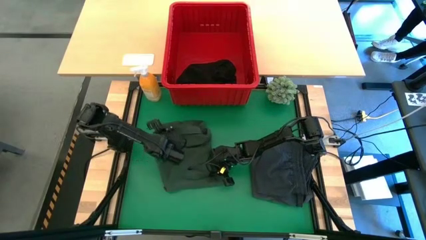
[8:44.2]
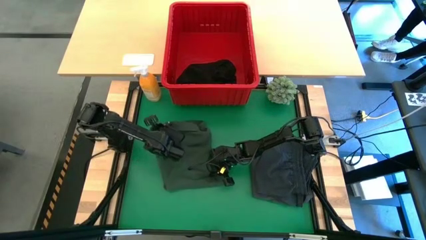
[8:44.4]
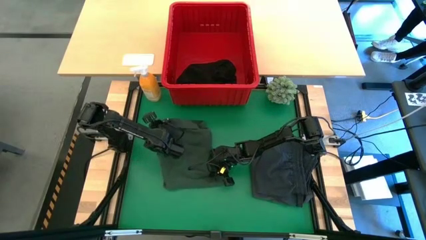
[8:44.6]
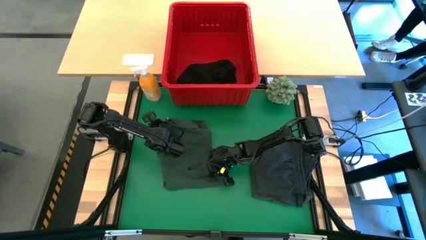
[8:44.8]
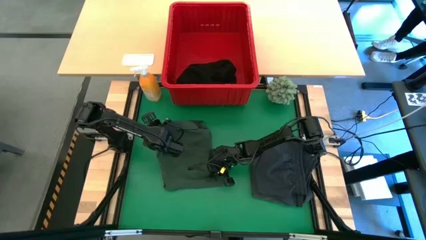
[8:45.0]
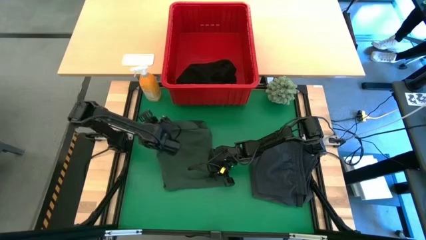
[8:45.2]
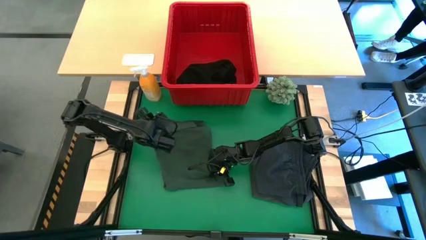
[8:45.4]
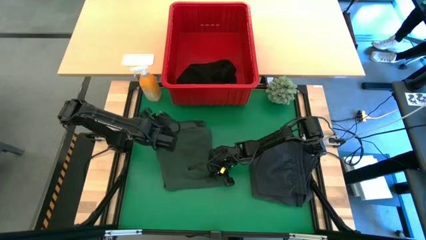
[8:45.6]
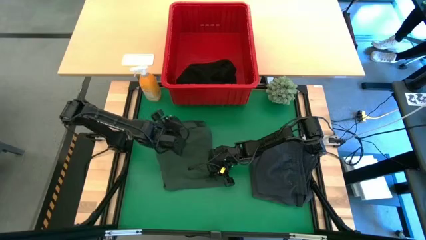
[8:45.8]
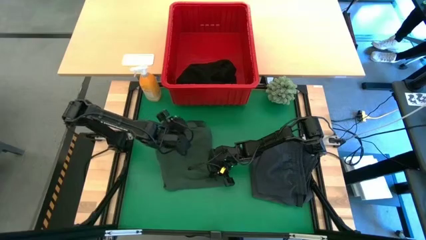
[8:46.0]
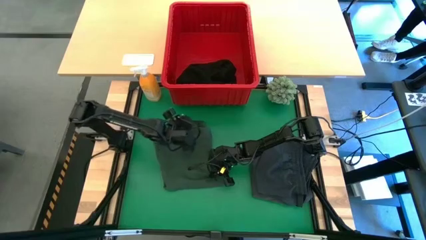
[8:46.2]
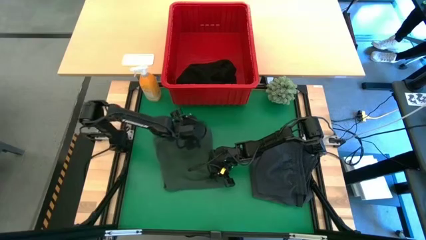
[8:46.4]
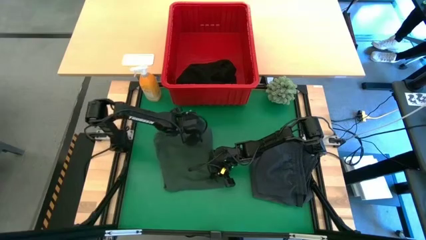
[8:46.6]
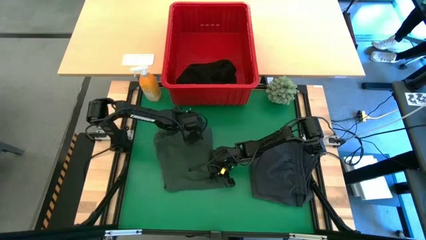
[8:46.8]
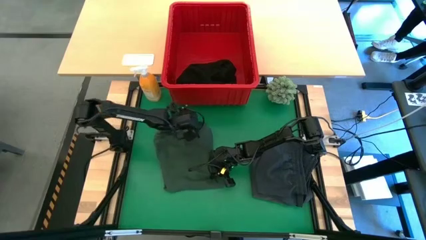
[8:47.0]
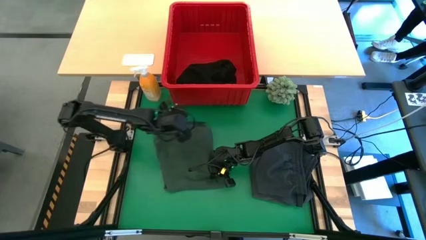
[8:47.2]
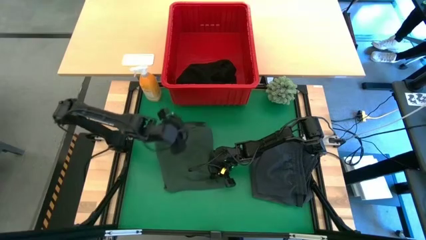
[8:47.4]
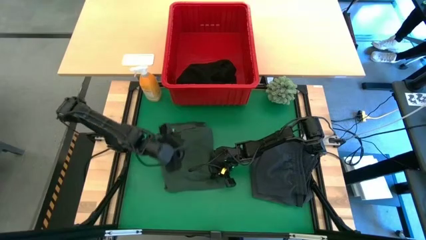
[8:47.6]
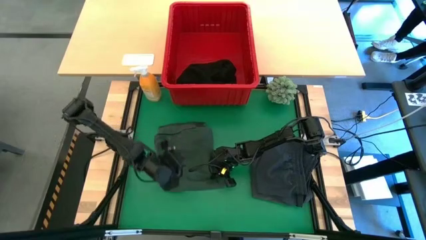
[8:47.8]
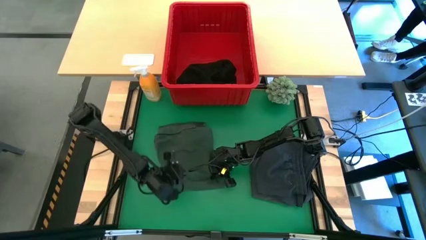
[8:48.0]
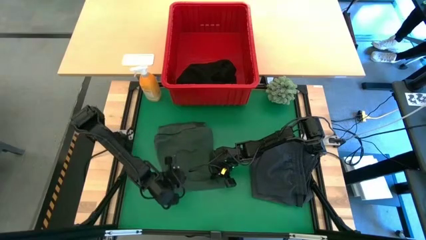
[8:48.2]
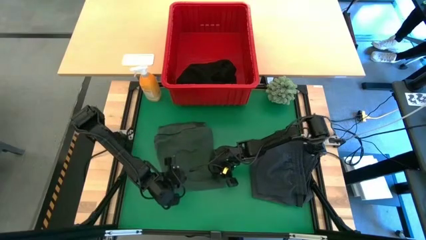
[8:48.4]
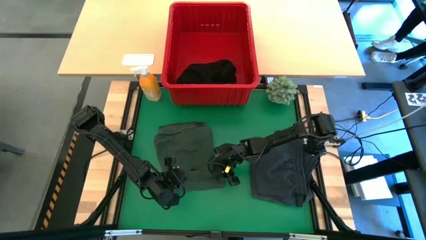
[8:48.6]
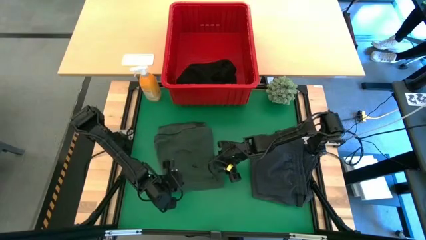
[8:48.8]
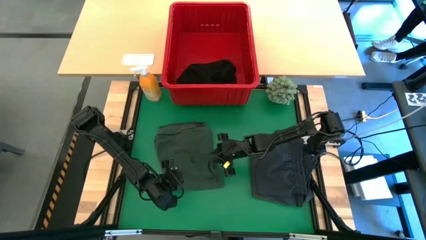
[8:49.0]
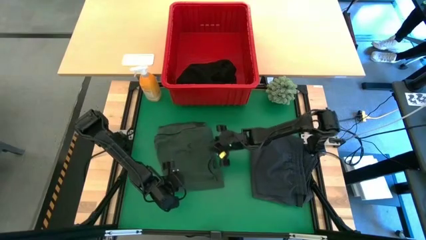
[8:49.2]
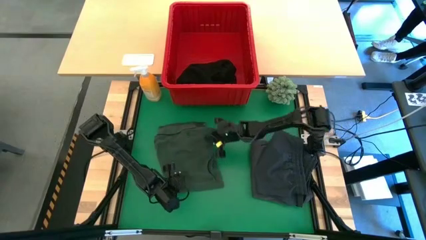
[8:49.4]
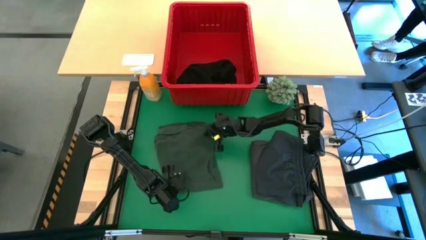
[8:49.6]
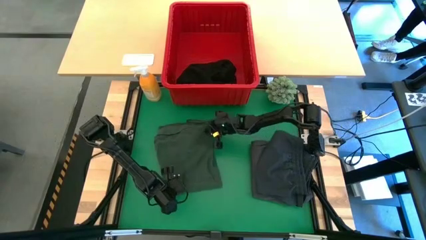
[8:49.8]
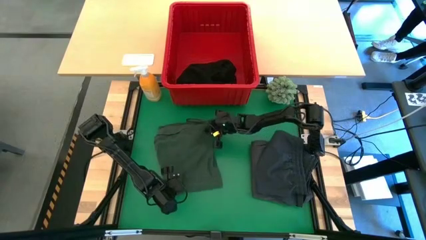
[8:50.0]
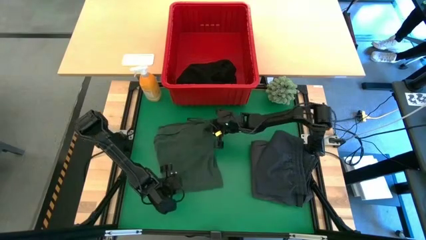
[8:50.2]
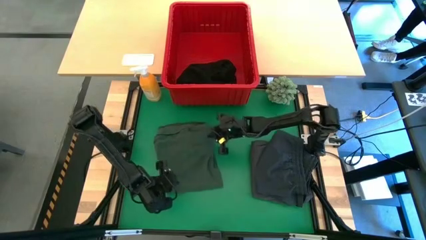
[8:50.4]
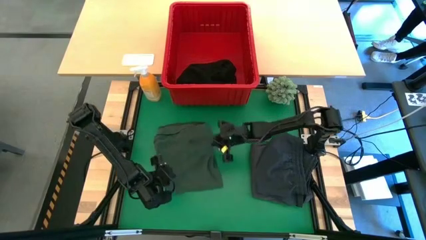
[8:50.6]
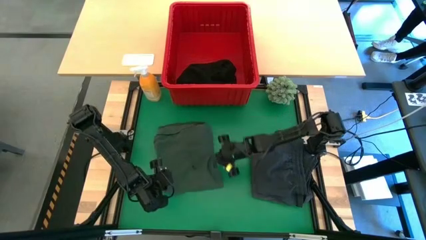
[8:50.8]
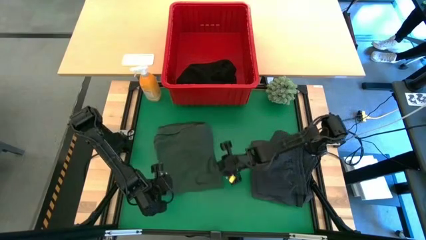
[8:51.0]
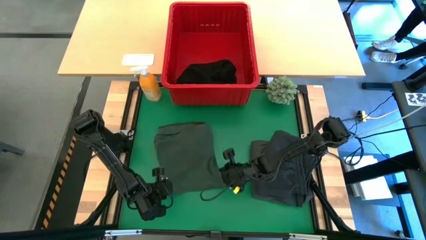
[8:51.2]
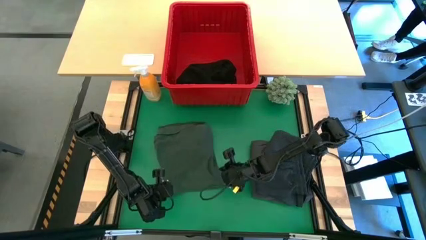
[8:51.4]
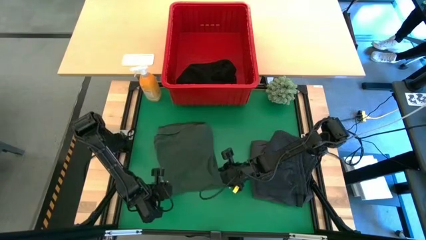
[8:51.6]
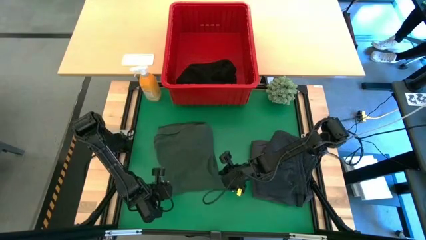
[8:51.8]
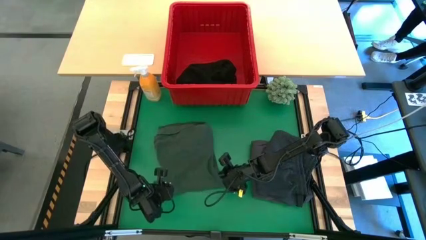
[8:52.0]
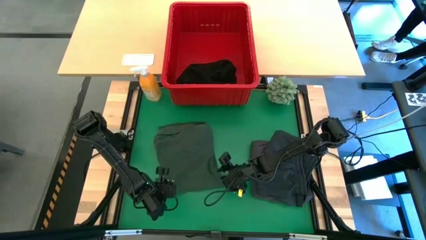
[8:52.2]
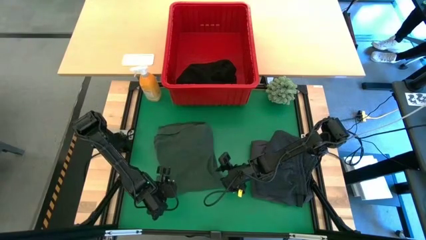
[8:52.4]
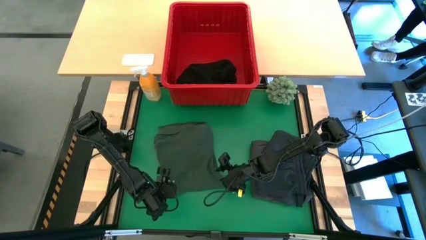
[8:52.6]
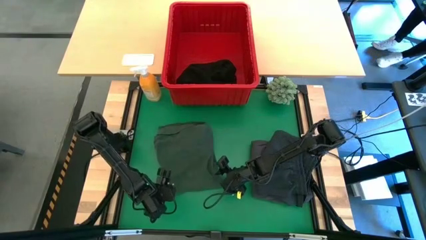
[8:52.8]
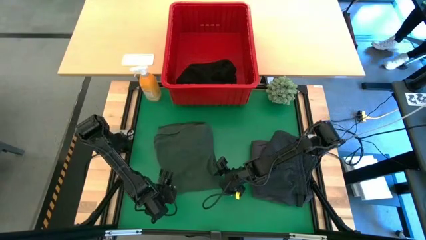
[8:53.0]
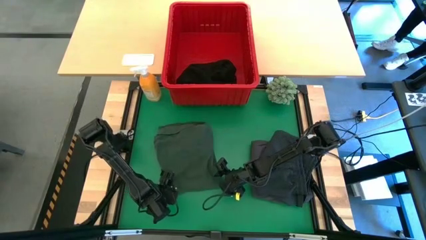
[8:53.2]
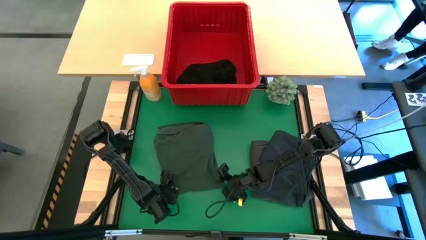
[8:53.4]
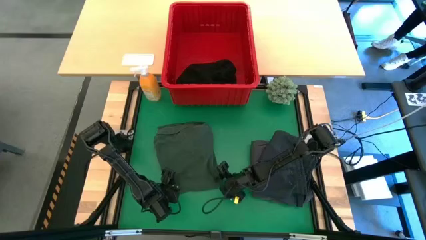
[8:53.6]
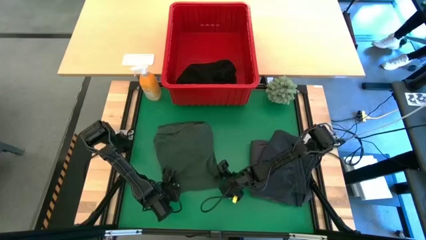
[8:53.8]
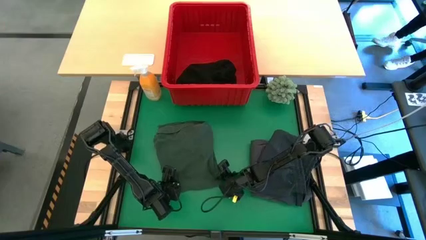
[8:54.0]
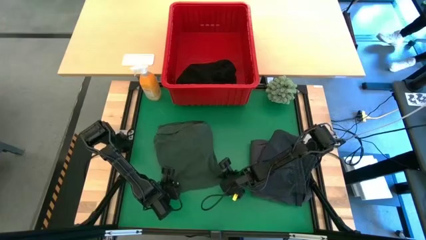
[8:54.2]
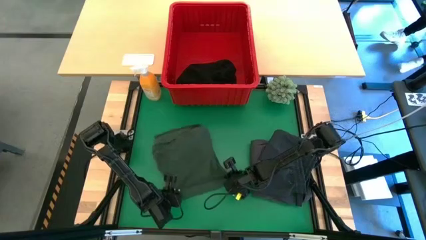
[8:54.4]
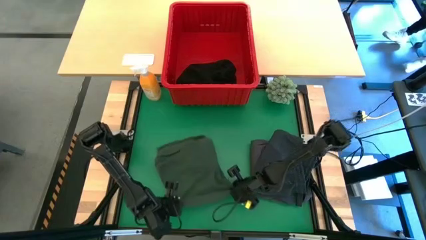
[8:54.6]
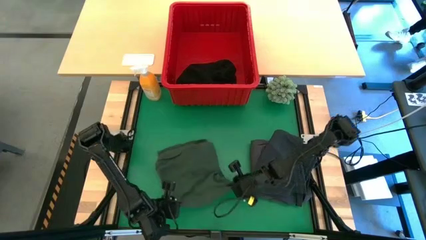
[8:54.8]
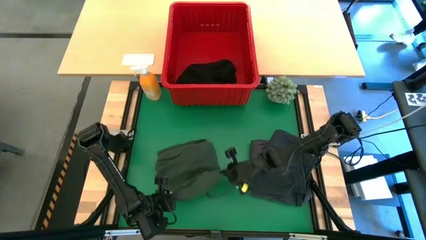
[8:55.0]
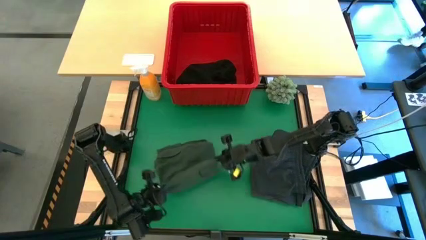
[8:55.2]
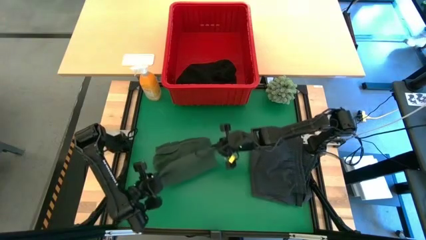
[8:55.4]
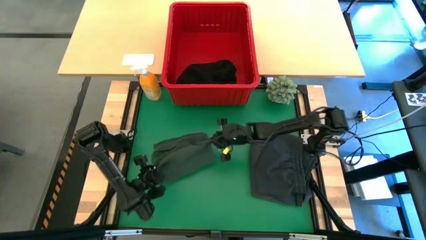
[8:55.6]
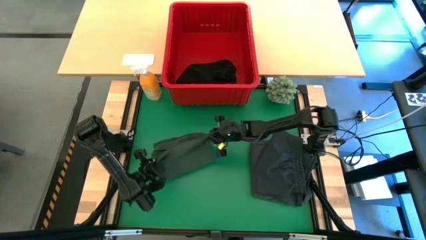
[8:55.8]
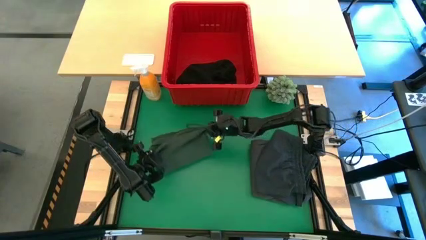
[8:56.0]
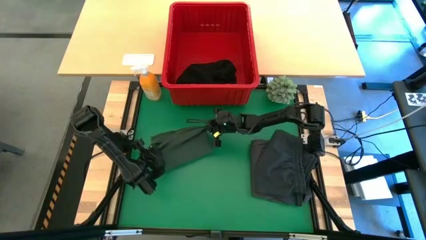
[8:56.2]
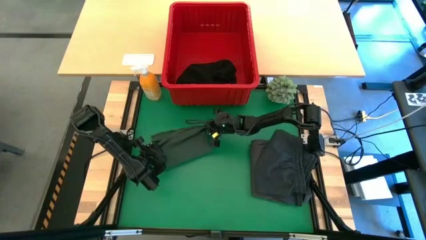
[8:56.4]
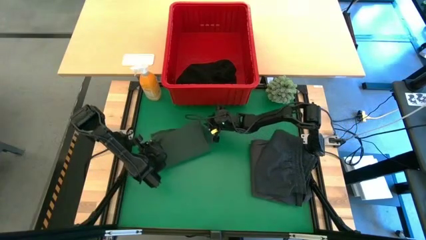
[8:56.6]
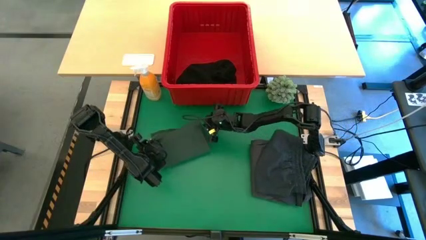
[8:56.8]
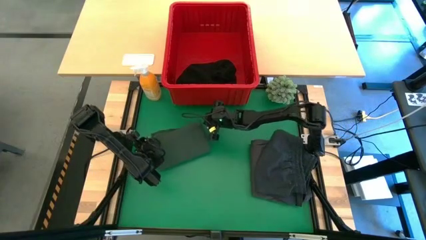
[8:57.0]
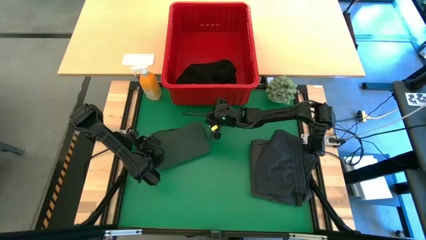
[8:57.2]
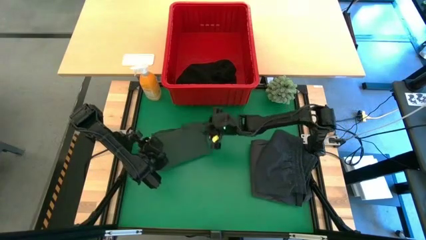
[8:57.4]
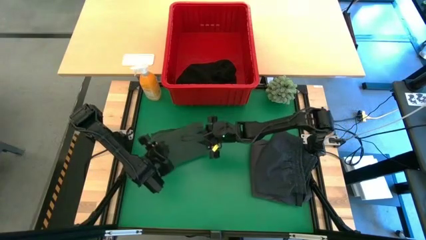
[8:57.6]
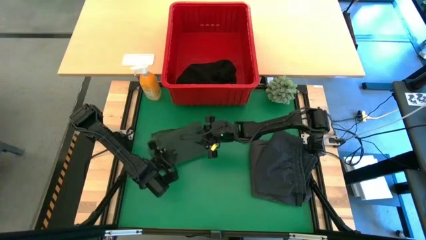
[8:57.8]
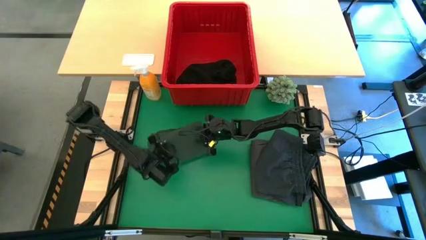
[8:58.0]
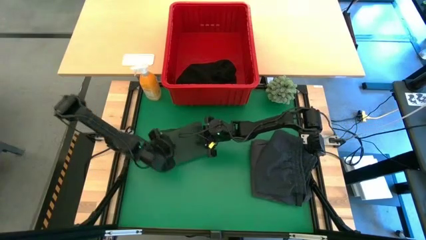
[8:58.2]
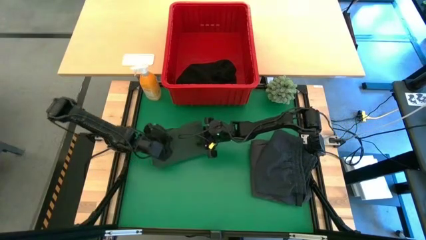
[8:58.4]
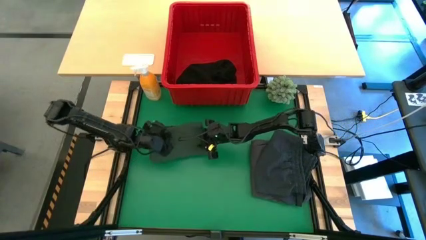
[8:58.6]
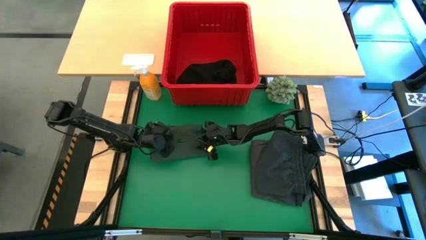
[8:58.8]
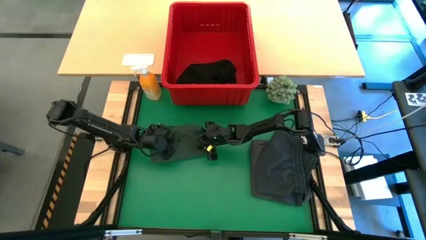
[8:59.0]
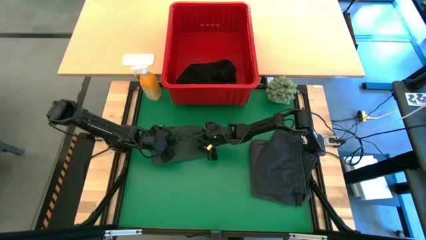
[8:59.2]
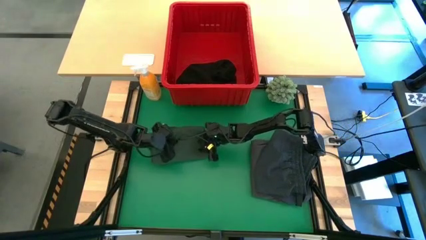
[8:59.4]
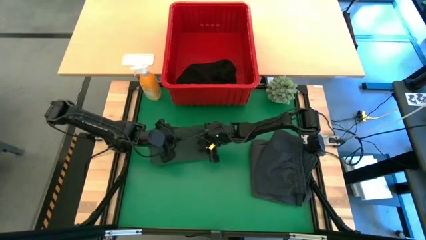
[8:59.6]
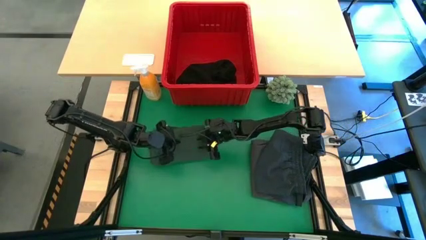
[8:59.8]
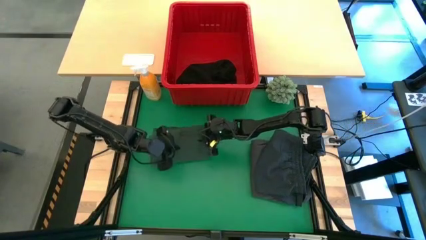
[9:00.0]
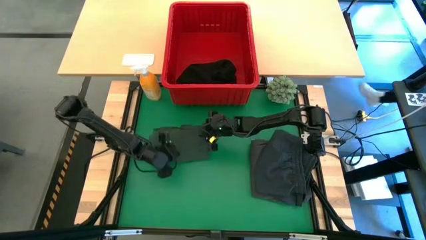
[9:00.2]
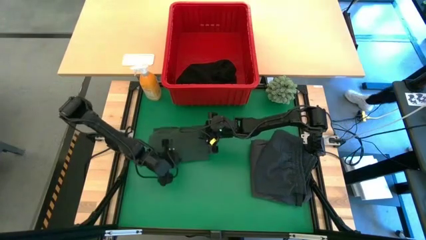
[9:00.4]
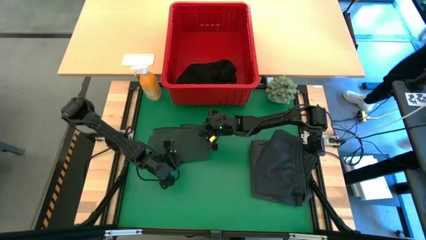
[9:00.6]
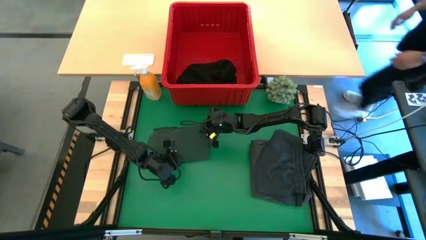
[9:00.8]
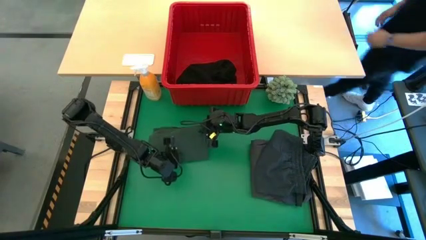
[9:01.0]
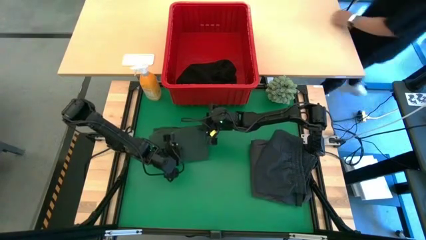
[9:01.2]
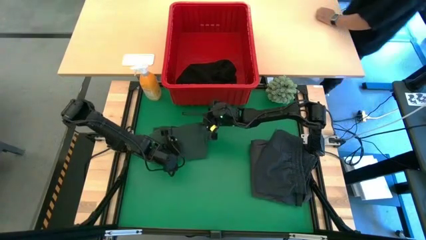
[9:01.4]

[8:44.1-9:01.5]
Task: Fold Laundry from Bin
Fold the green polo
